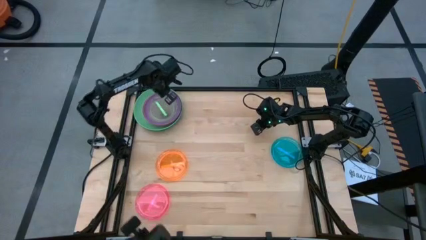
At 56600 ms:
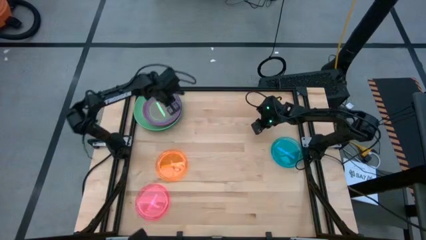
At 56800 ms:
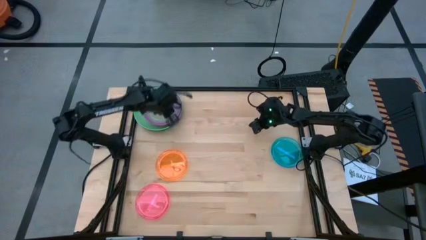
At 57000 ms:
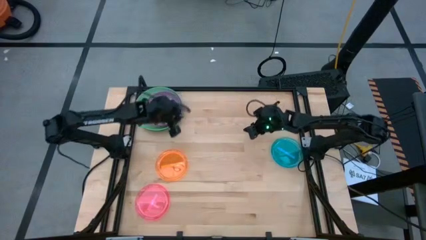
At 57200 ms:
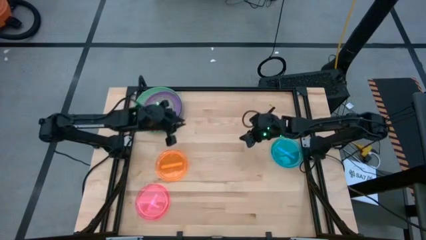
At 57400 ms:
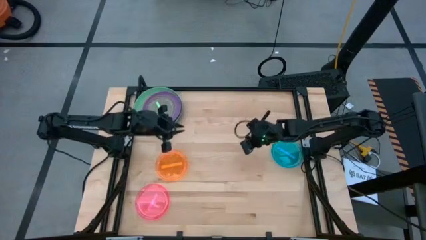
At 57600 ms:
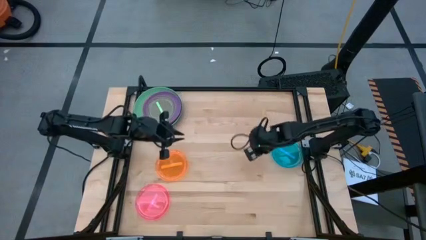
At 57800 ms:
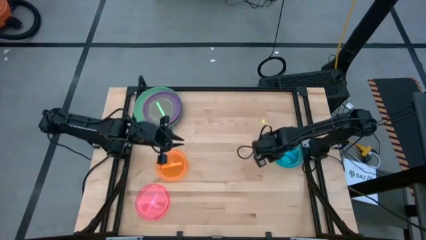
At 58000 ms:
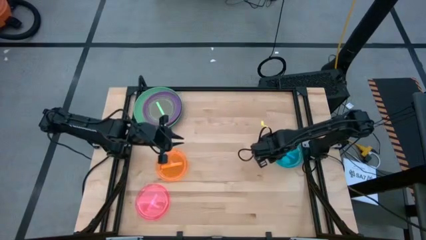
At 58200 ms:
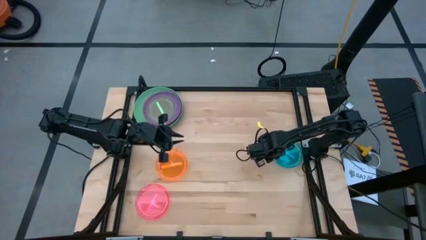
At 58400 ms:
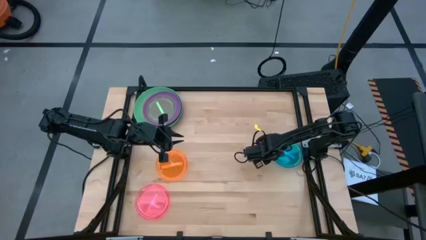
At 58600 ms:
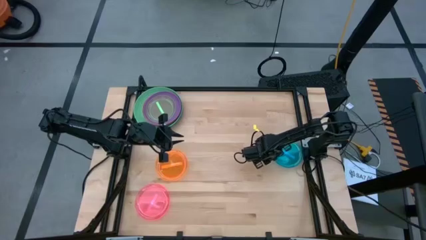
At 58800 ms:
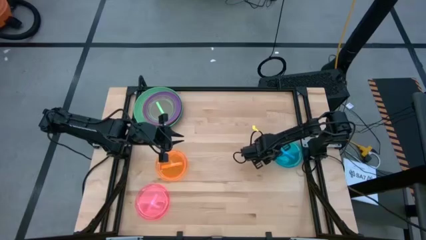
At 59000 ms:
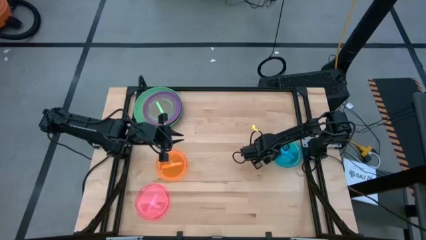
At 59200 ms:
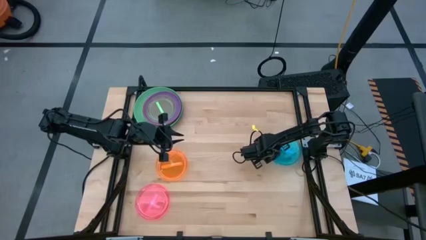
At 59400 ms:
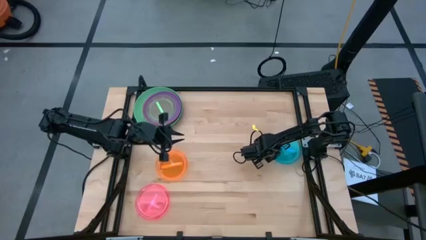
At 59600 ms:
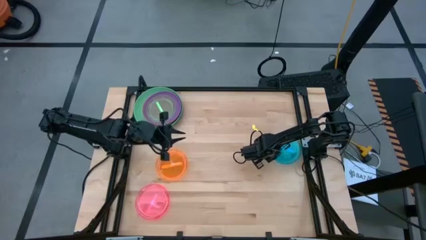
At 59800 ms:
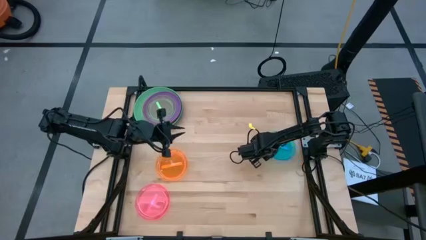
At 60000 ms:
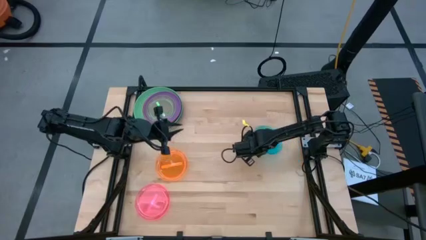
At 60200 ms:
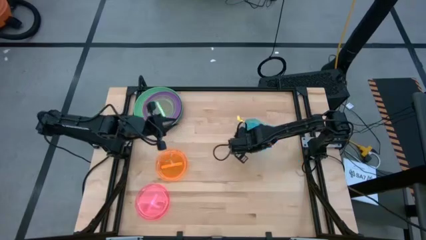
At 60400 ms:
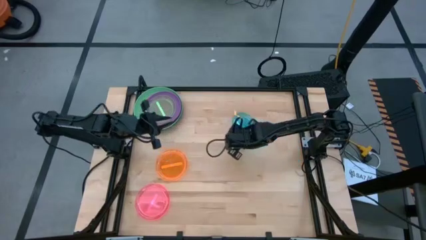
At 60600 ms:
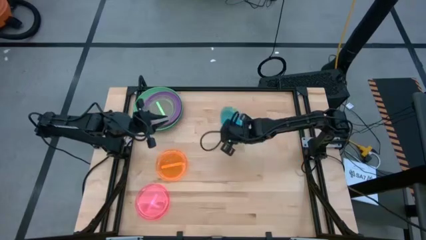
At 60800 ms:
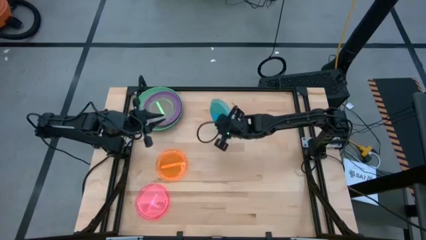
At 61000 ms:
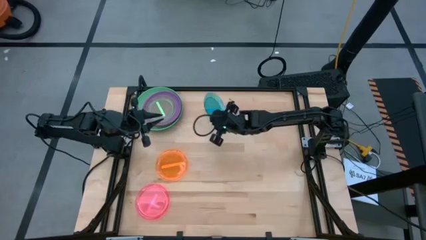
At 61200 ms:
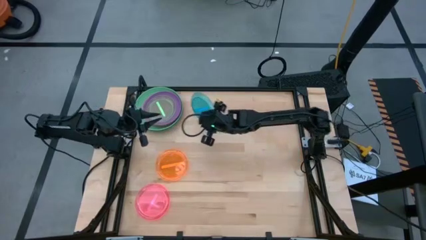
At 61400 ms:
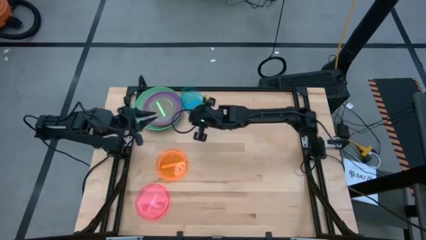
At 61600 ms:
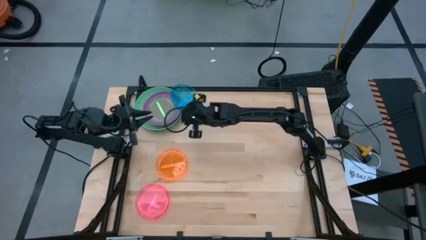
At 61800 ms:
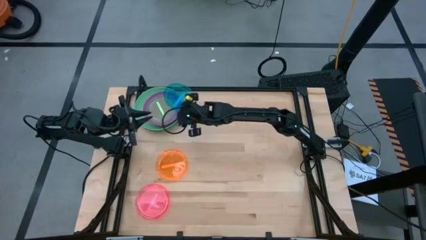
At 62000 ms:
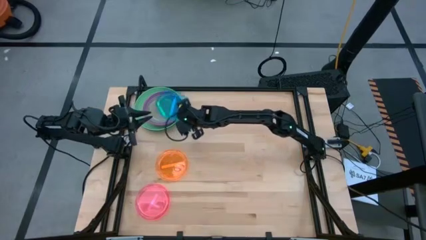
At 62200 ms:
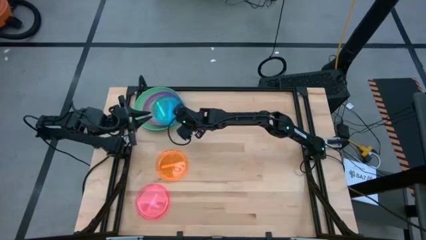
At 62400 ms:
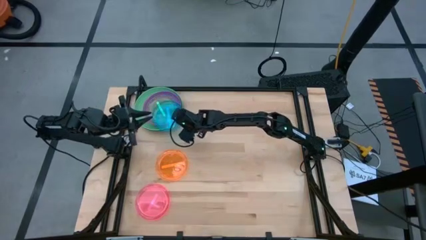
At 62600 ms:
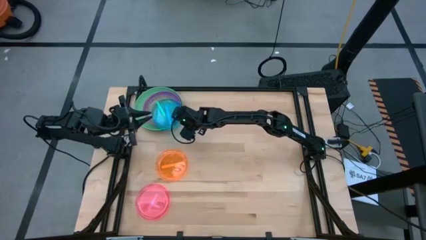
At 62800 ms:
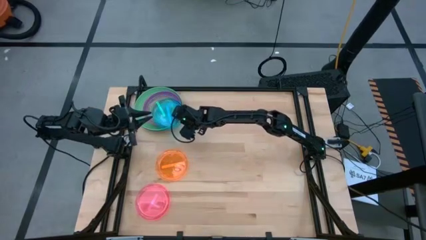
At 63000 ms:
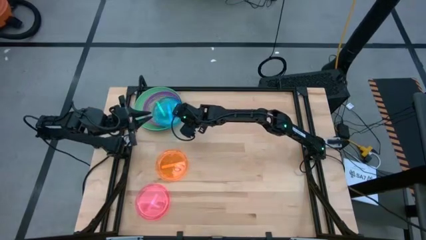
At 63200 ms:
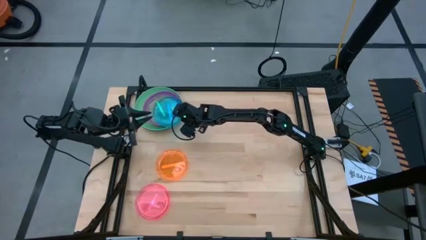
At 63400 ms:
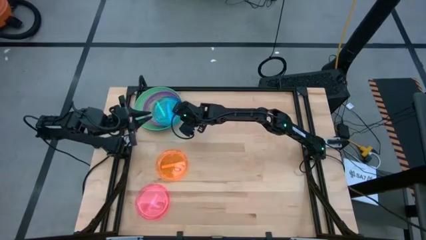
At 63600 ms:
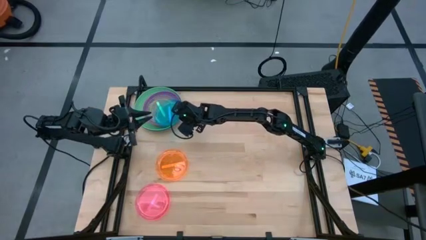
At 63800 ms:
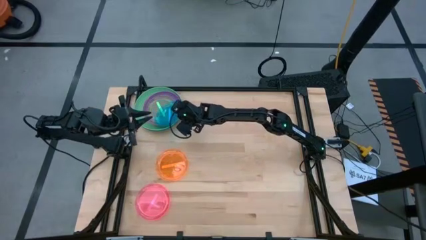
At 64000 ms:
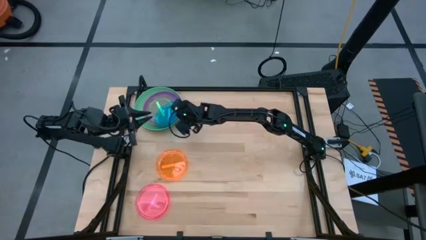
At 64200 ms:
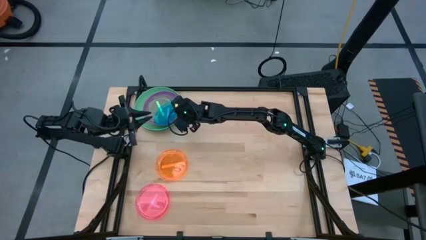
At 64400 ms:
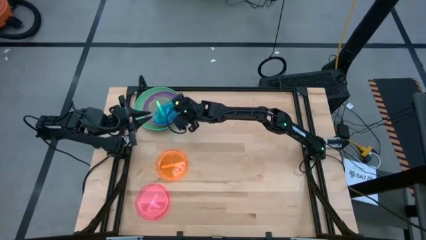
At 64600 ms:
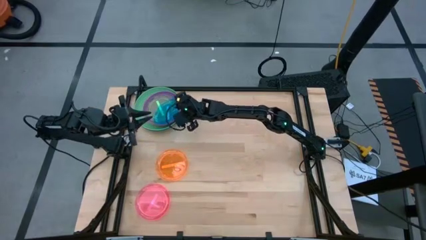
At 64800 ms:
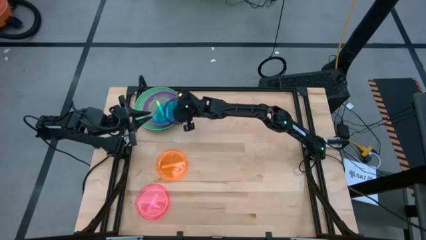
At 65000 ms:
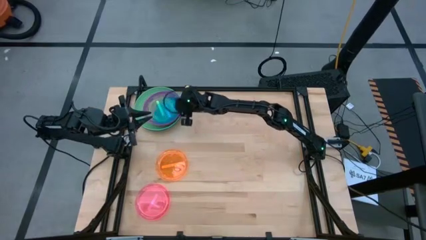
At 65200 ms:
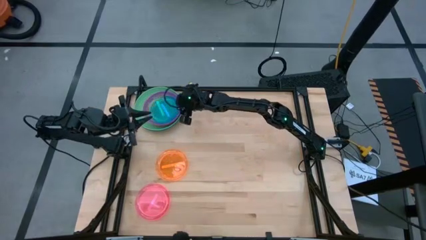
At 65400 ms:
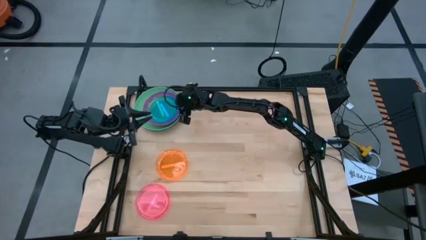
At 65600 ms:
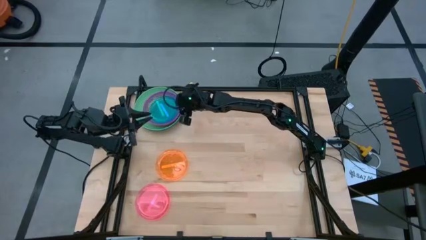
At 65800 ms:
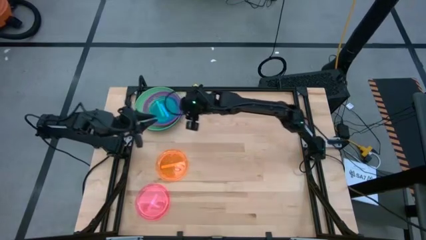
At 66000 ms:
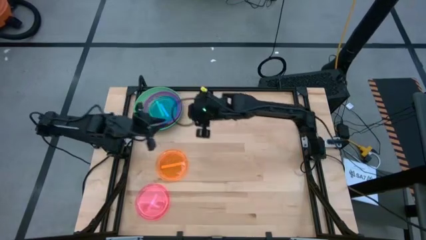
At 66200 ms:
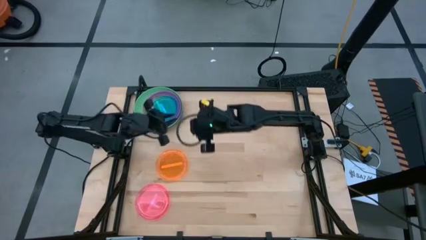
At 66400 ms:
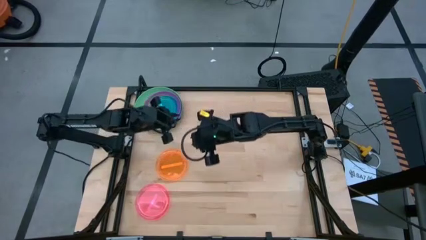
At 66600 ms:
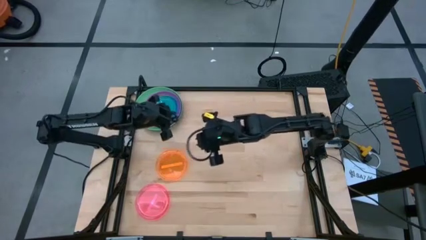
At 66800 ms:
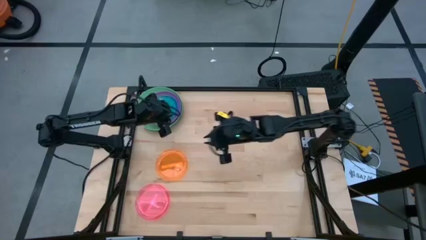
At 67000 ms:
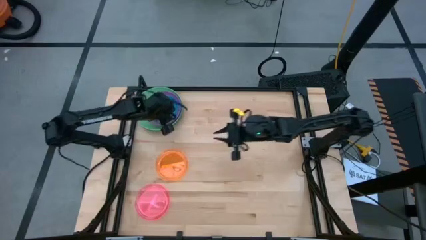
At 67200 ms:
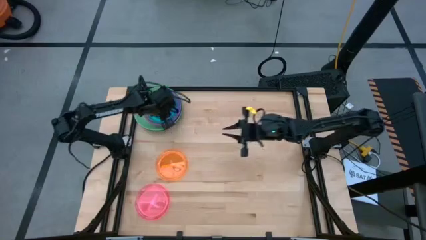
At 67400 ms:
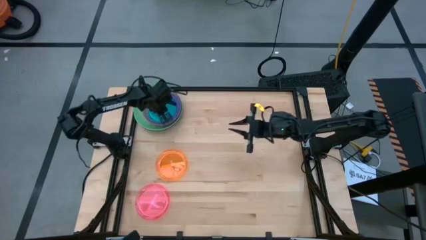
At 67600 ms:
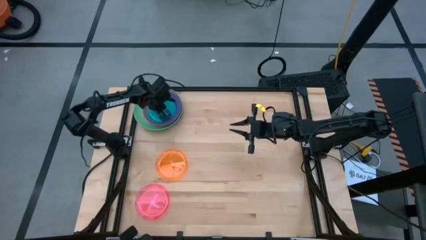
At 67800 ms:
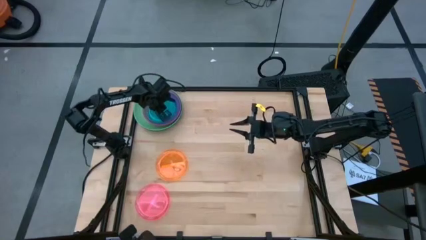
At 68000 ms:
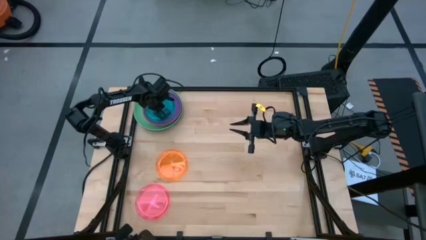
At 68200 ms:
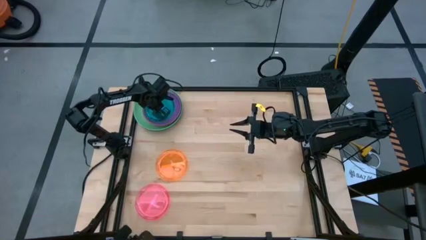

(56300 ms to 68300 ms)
Task: Stack plastic plates
Stack the transparent blue plate on top of the transparent green plate

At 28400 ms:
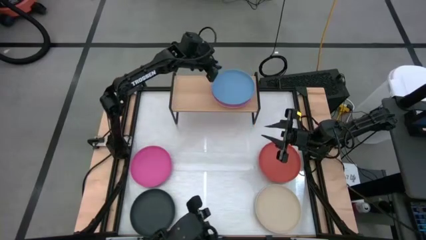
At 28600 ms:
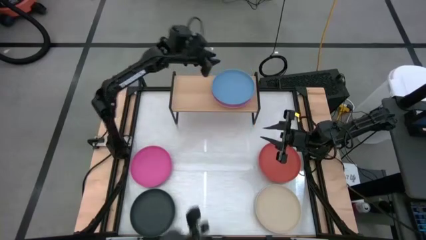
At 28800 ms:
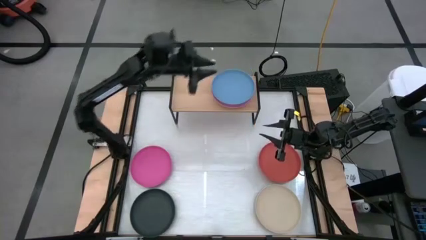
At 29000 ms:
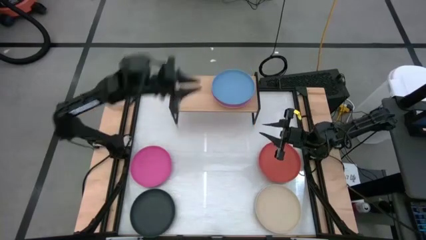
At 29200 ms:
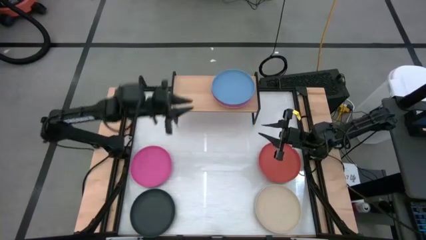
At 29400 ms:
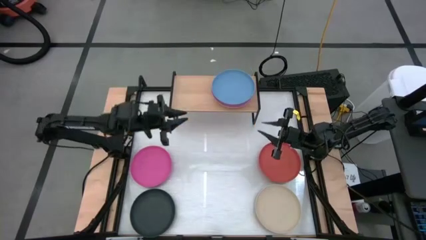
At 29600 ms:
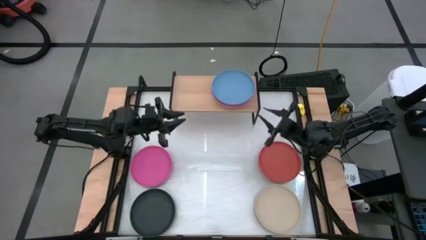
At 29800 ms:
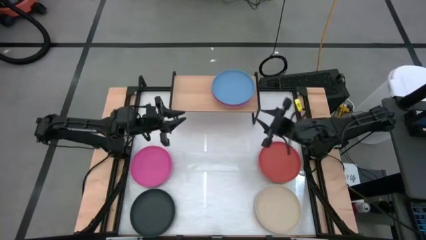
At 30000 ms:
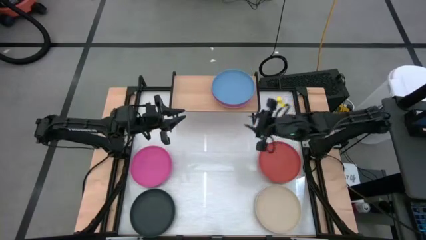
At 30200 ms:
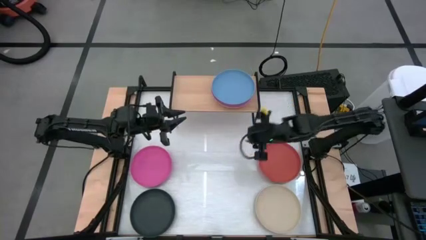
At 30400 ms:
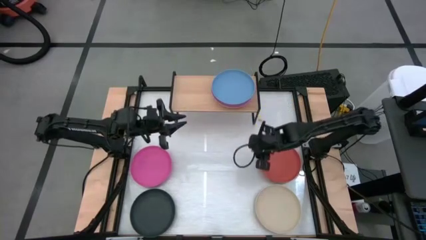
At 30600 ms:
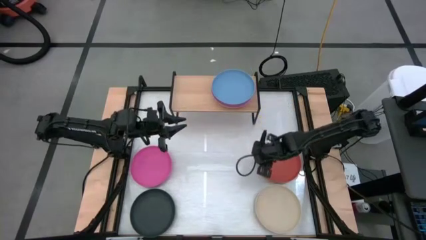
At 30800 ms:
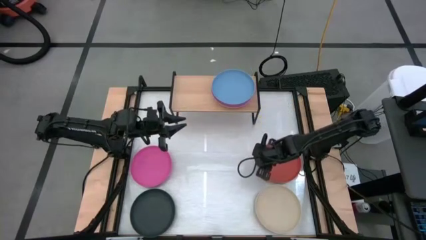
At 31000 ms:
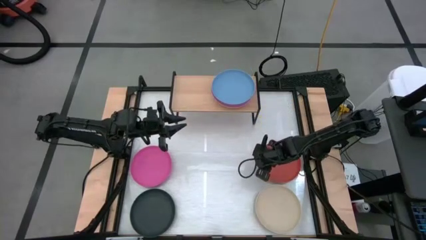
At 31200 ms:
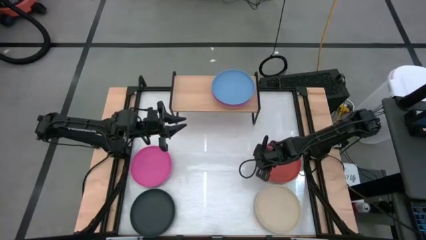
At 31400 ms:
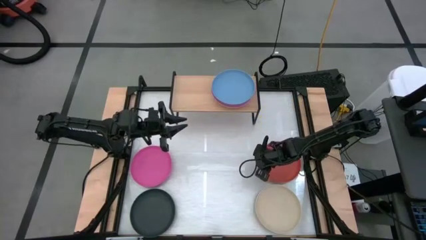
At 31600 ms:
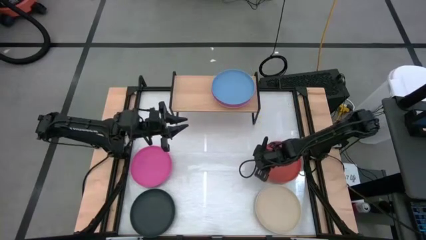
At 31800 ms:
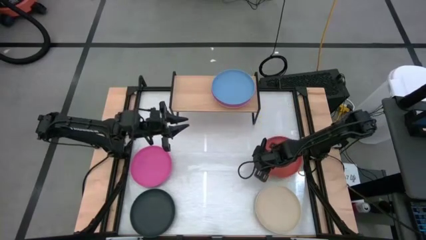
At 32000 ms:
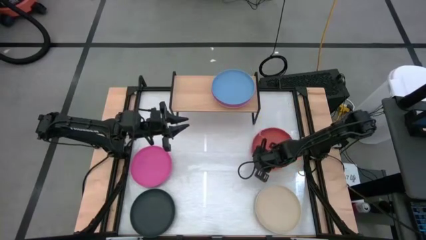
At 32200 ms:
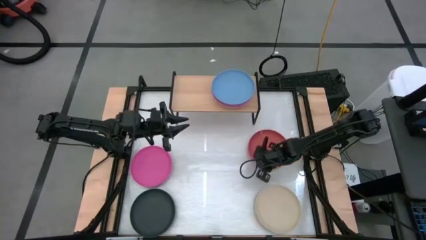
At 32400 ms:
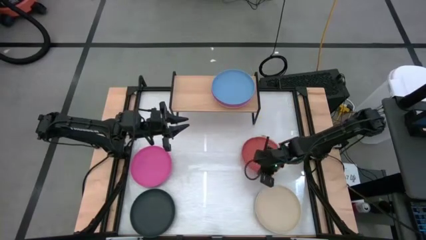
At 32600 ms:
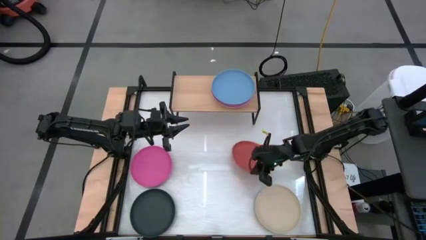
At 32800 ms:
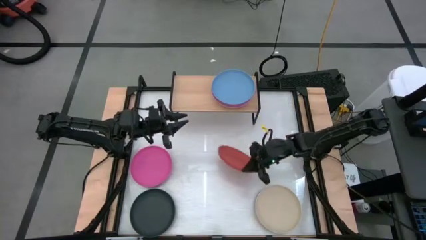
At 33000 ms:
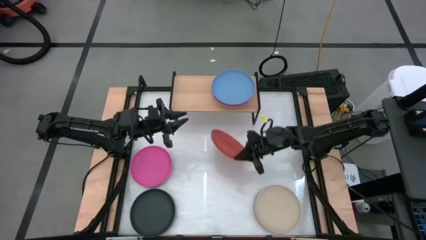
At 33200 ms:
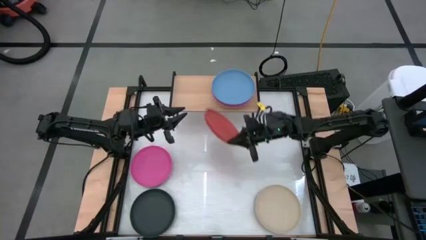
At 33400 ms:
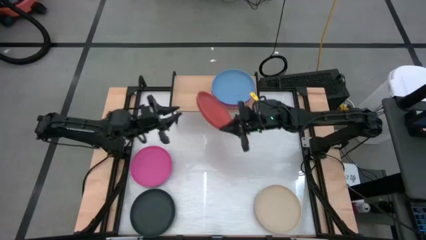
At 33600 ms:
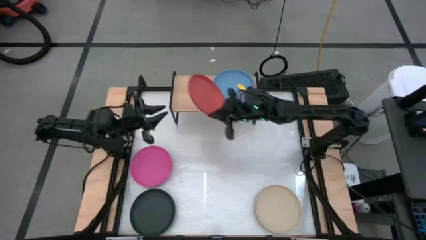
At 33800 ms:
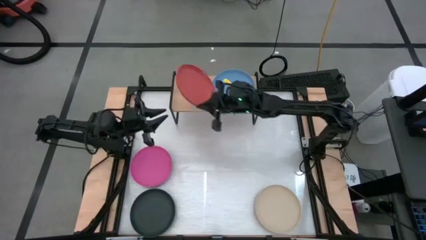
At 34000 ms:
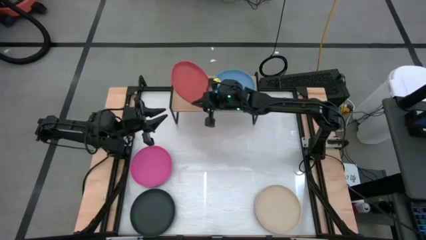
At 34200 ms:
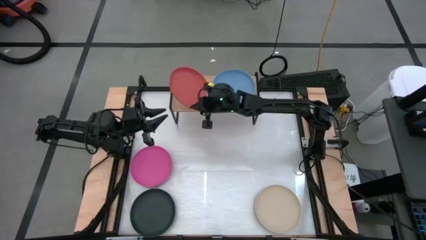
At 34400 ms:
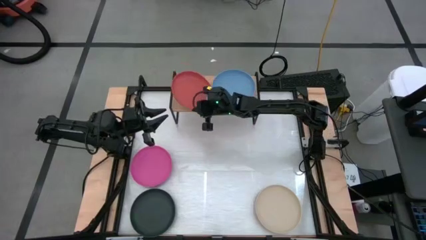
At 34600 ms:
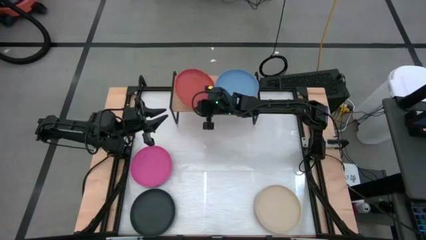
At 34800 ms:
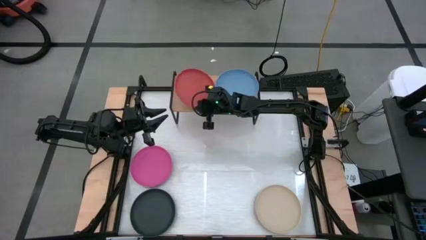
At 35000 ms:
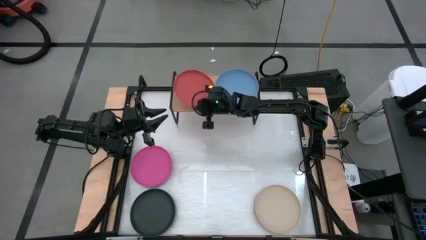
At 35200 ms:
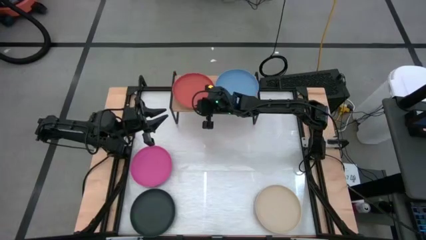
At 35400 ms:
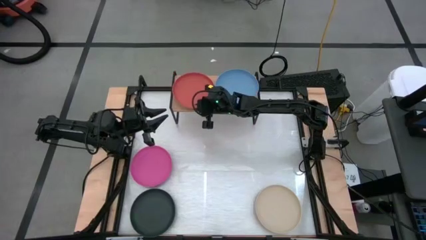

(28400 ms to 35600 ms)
Task: Place and stack plates onto a shelf
Put the orange plate on the shelf
